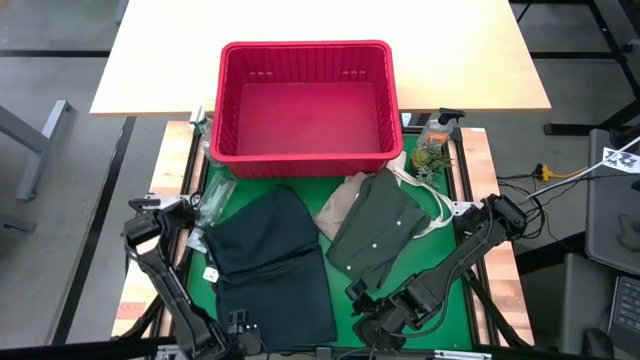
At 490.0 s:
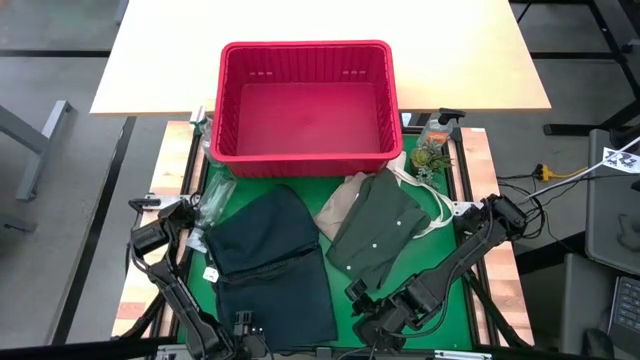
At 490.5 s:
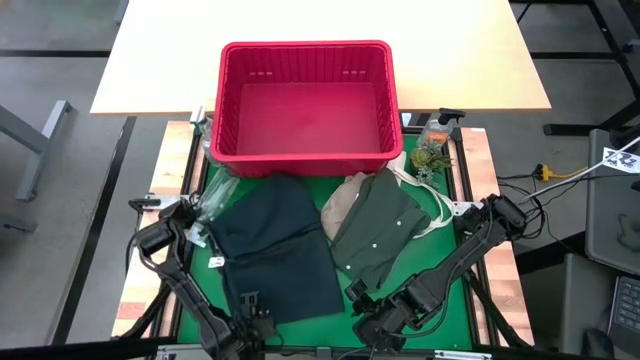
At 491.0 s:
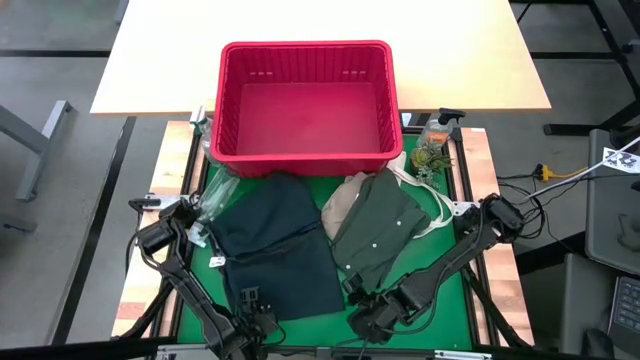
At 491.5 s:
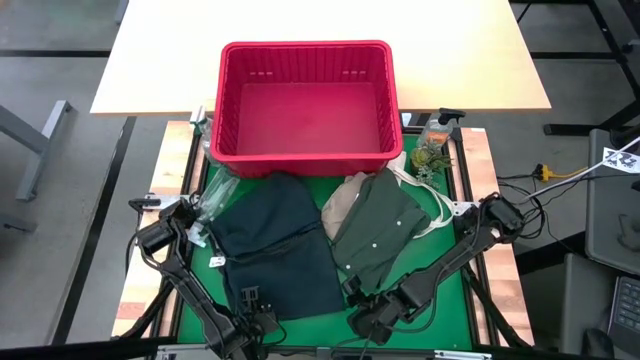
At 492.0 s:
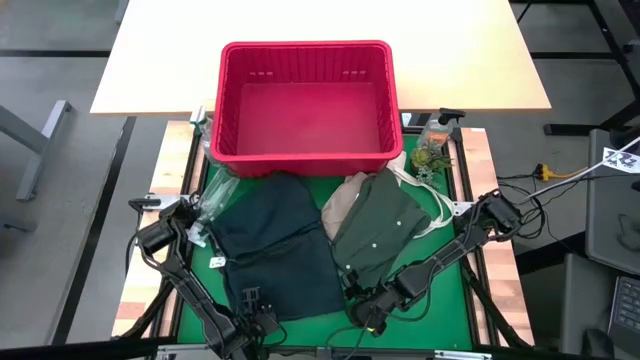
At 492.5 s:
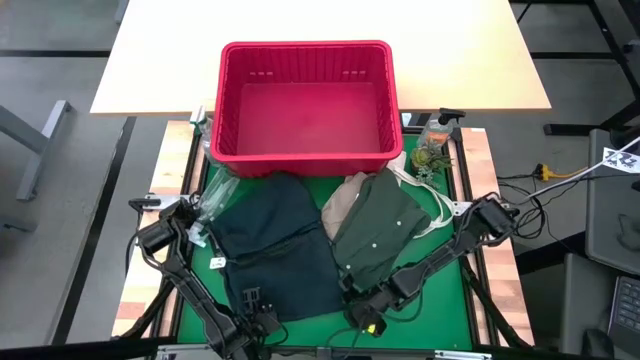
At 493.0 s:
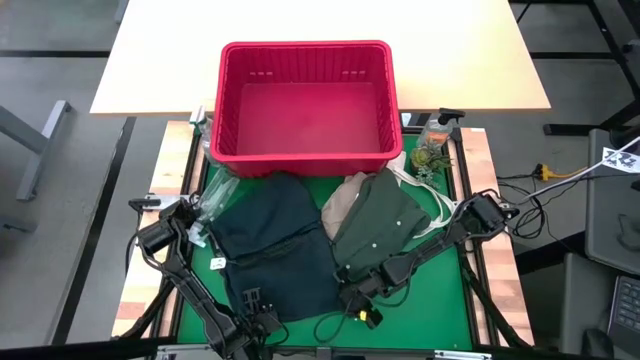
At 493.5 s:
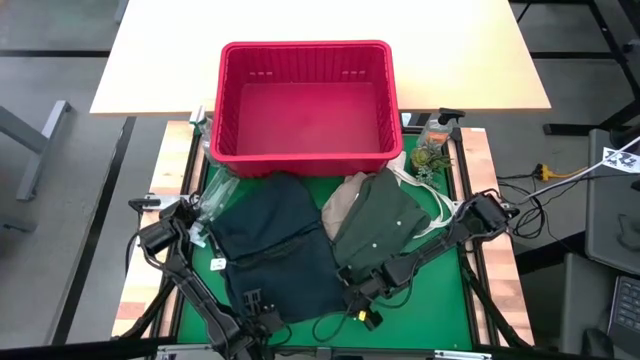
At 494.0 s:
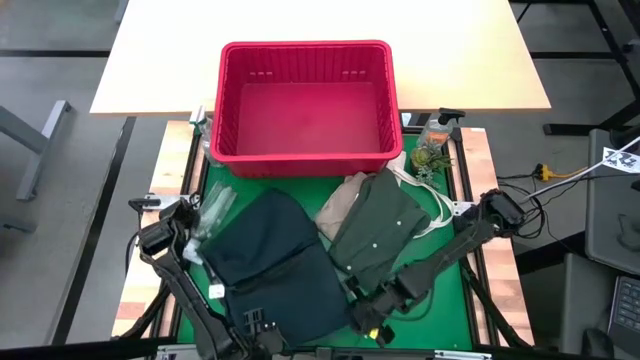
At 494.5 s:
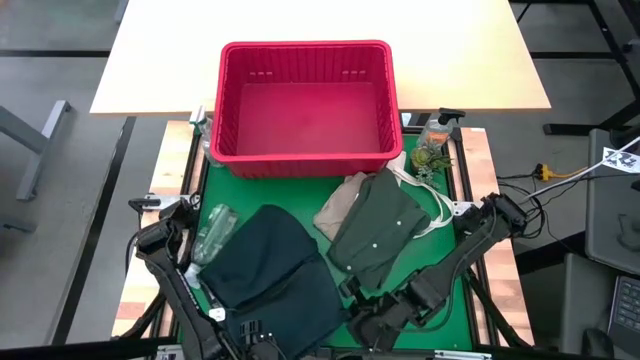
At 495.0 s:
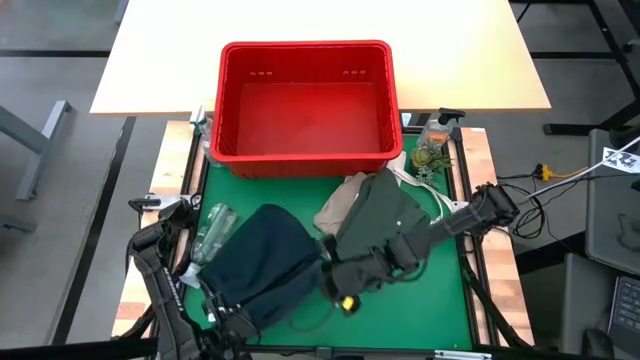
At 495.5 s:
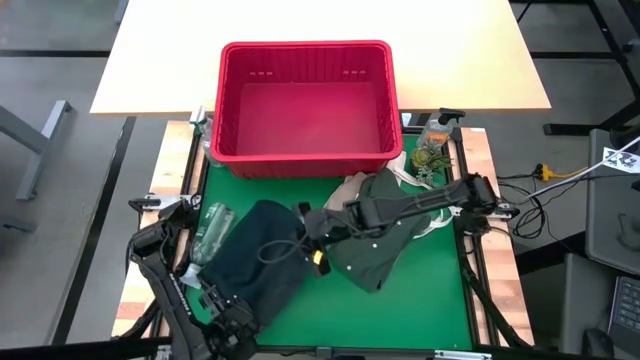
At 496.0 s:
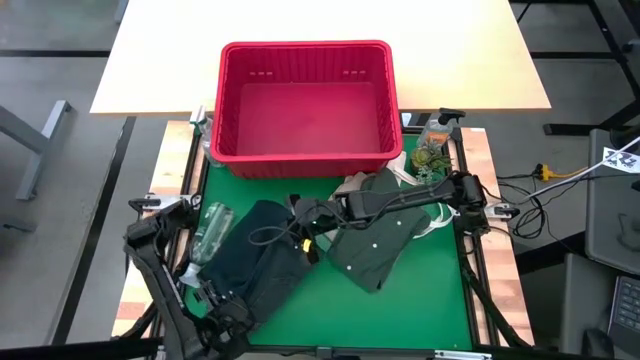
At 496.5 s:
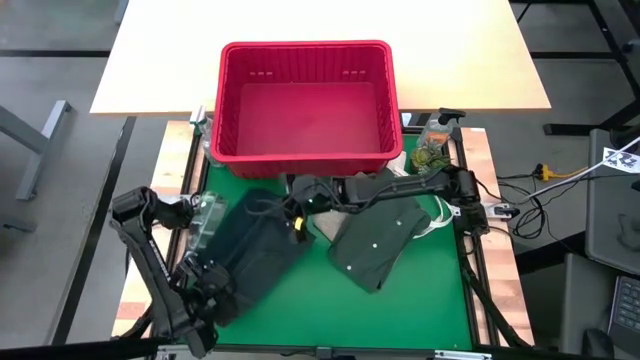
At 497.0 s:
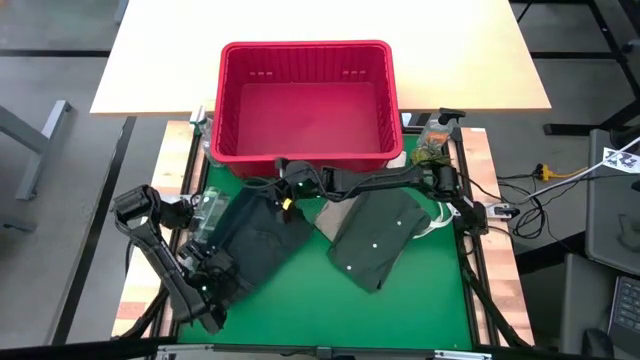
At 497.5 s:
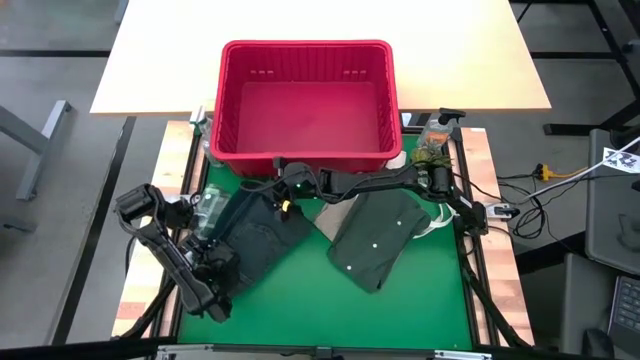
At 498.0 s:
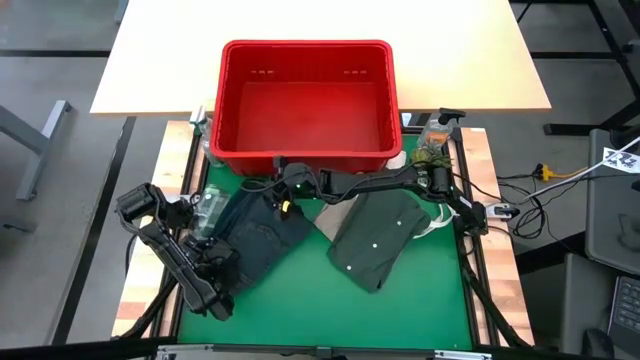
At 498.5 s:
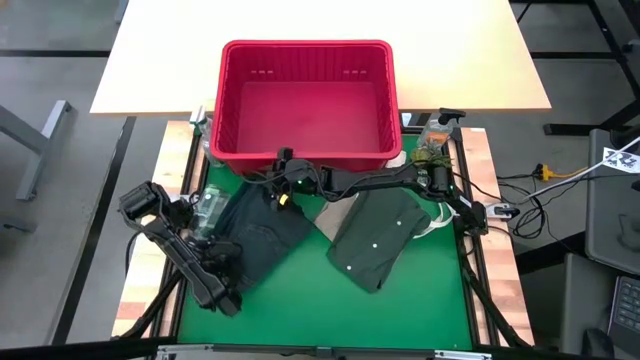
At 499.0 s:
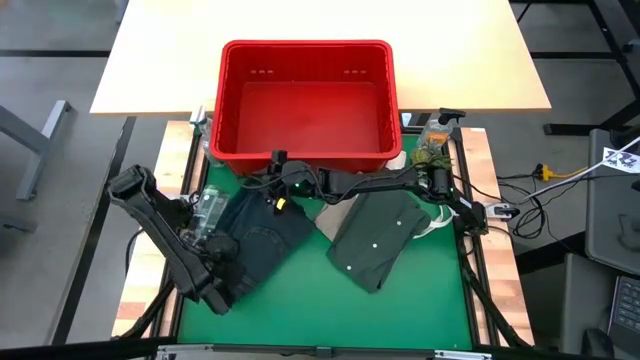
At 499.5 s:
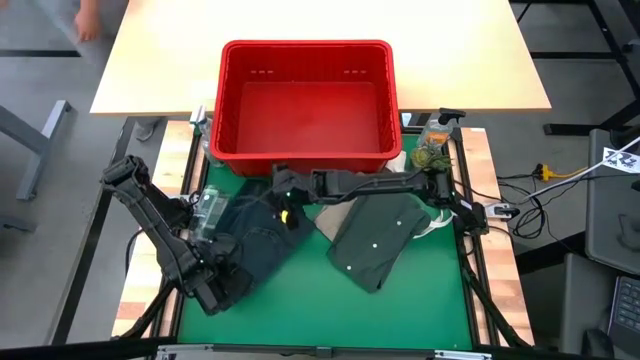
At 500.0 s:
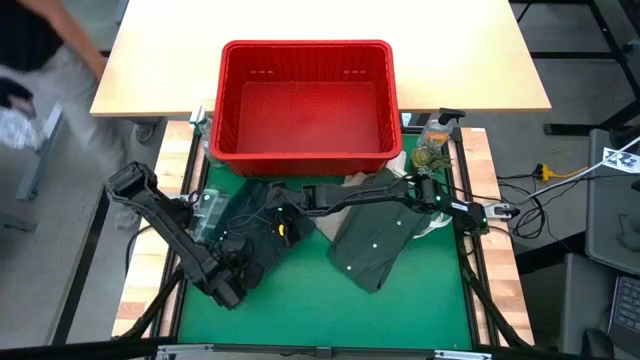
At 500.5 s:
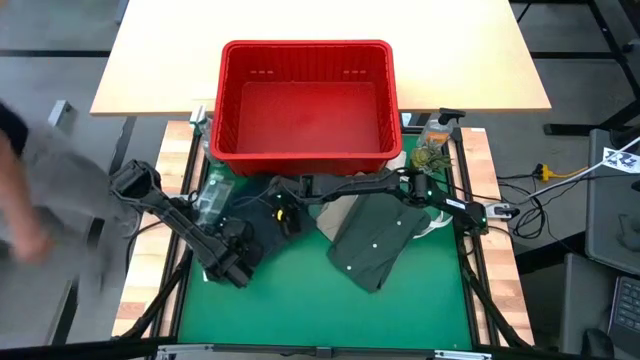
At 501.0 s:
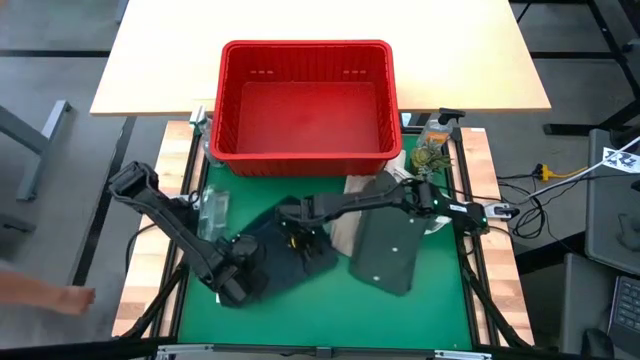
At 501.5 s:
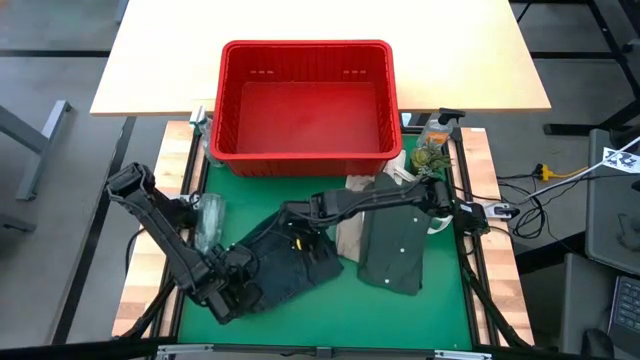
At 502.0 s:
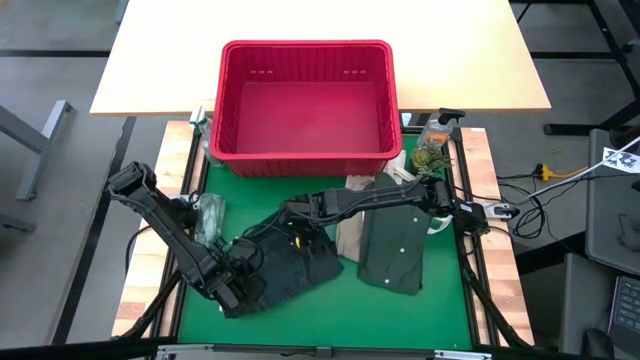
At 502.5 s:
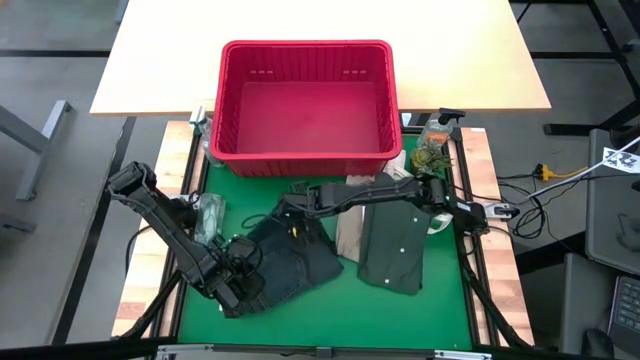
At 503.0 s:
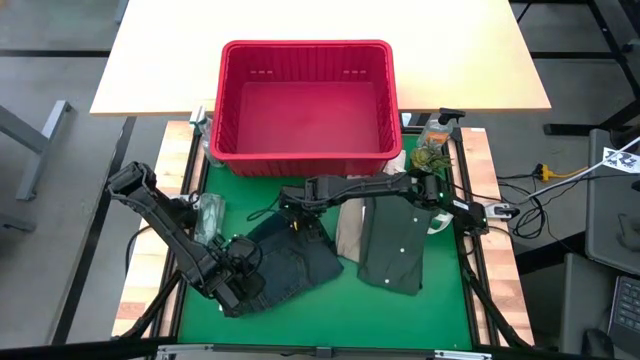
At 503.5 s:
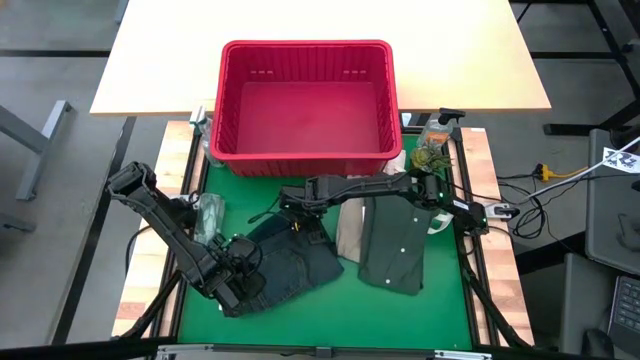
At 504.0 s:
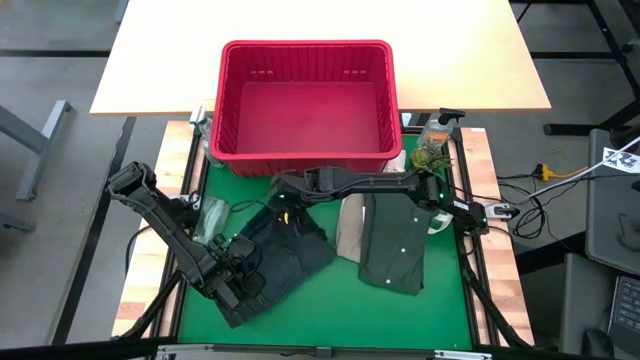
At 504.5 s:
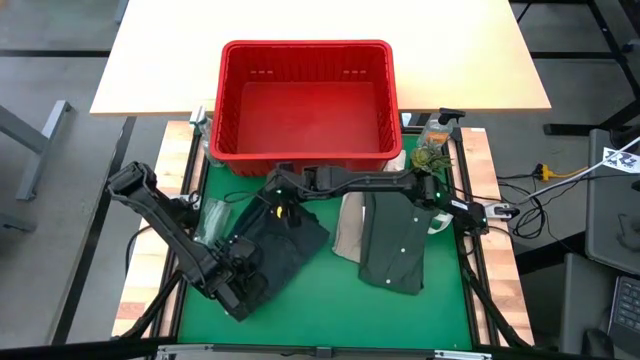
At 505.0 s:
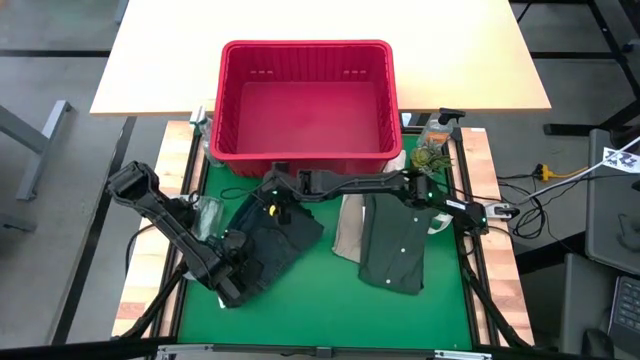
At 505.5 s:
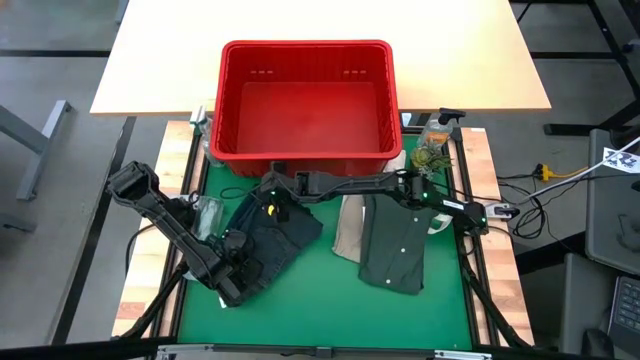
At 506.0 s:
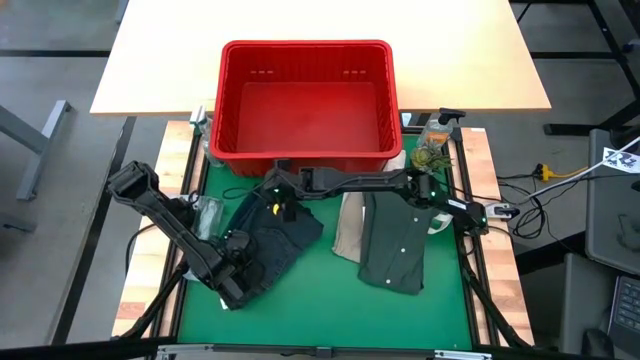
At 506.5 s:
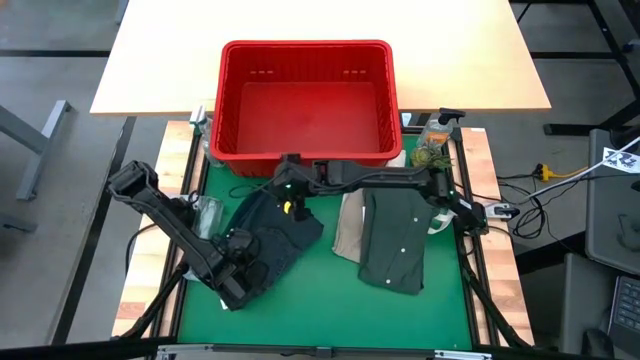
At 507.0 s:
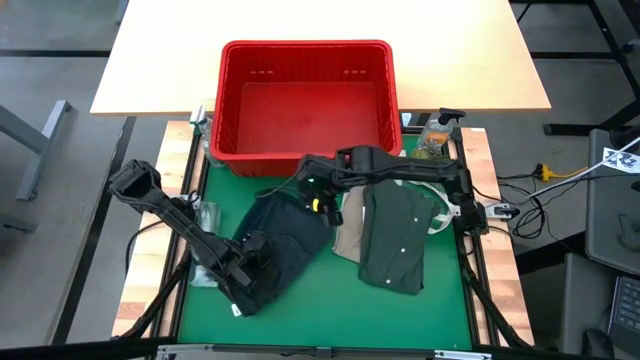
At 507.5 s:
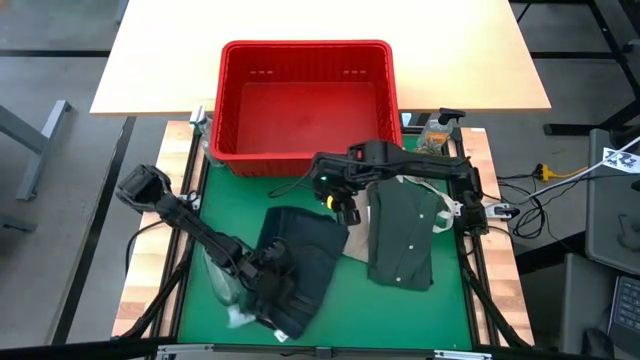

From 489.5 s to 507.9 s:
Task: Fold laundry
Fold the dark blue pants
